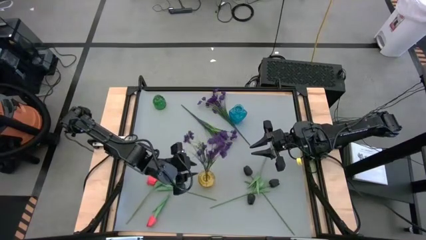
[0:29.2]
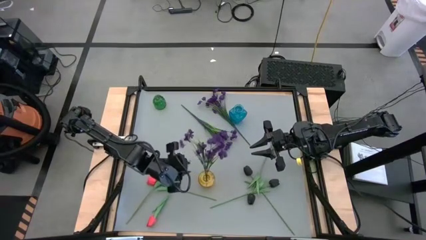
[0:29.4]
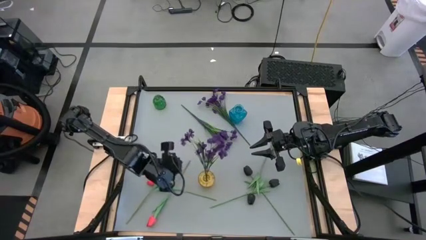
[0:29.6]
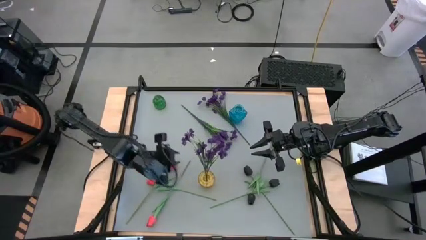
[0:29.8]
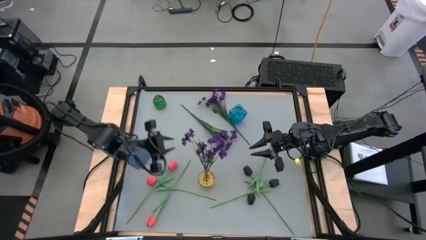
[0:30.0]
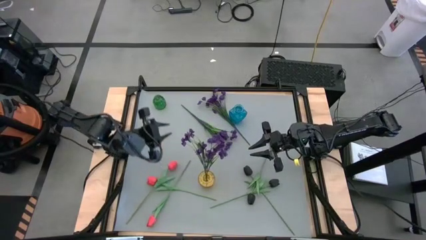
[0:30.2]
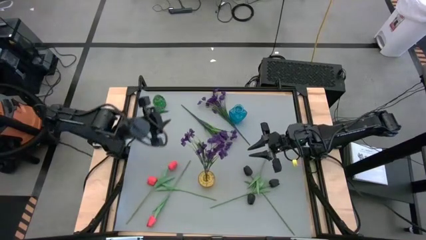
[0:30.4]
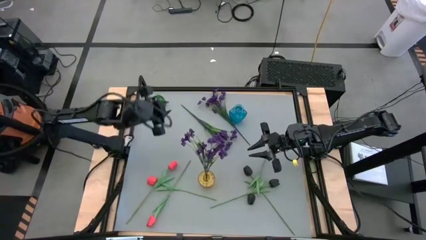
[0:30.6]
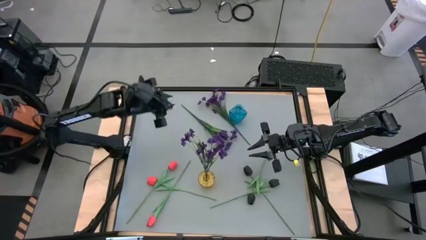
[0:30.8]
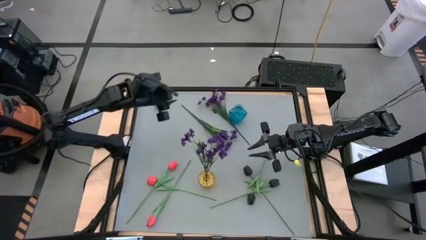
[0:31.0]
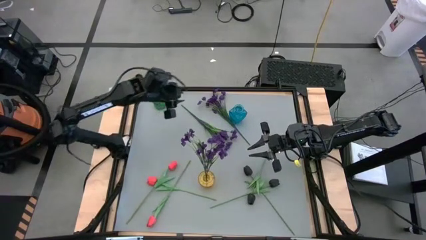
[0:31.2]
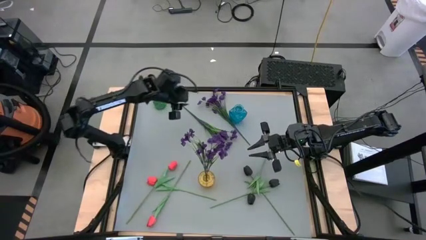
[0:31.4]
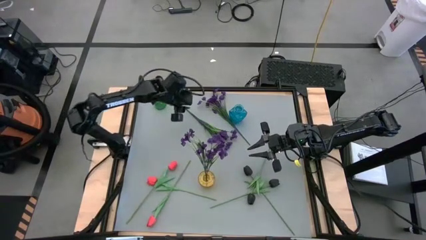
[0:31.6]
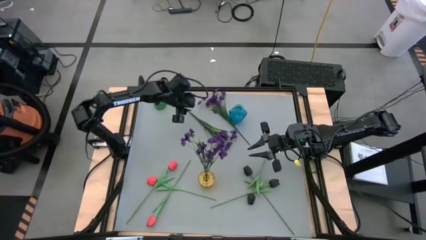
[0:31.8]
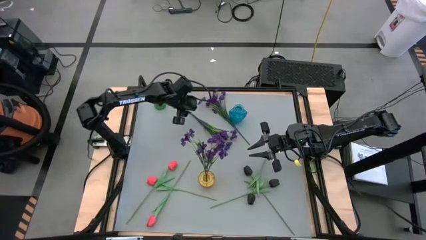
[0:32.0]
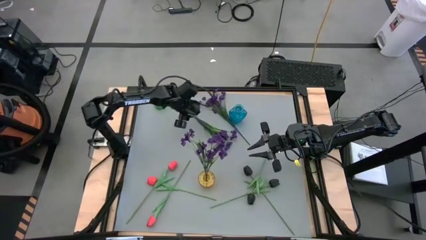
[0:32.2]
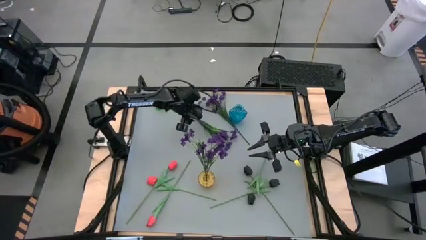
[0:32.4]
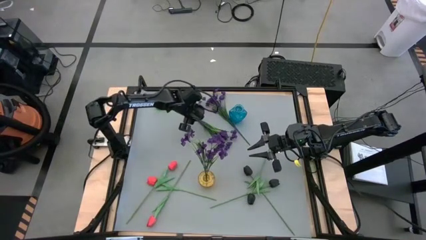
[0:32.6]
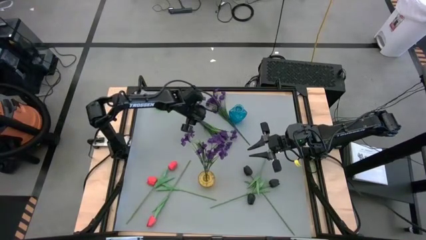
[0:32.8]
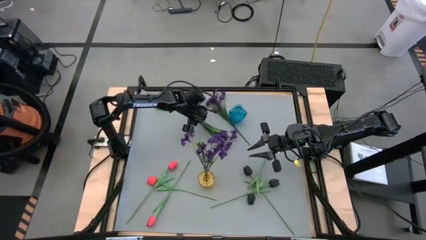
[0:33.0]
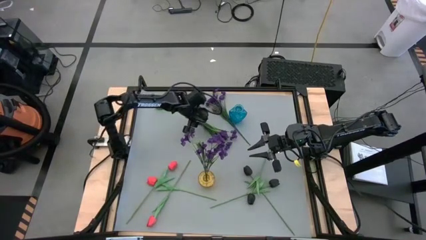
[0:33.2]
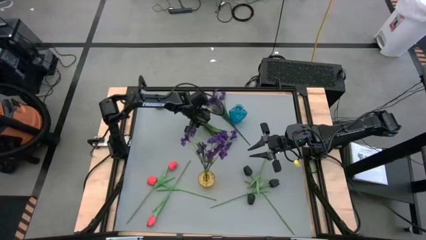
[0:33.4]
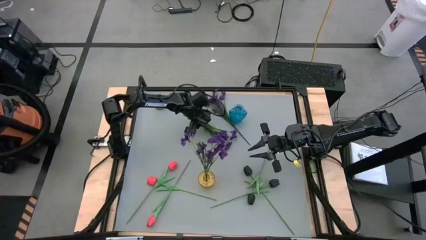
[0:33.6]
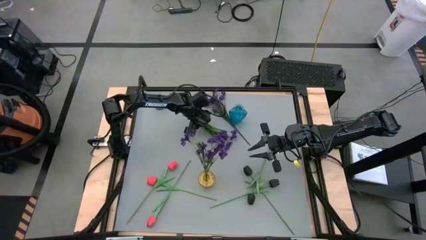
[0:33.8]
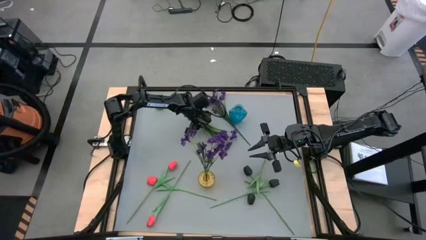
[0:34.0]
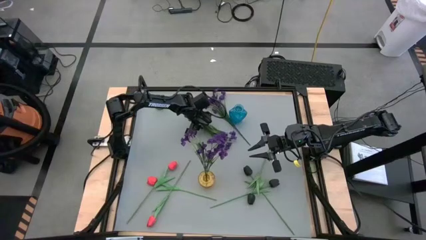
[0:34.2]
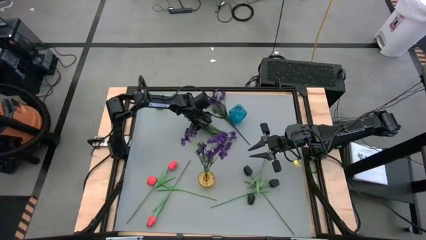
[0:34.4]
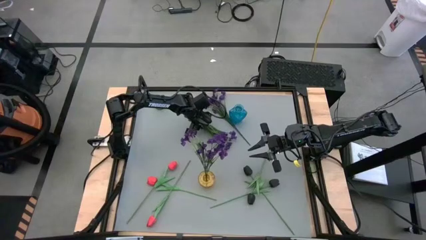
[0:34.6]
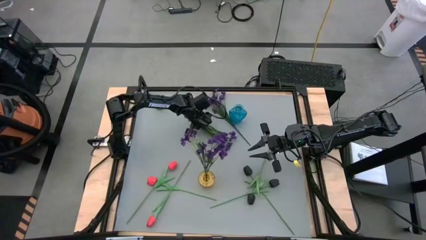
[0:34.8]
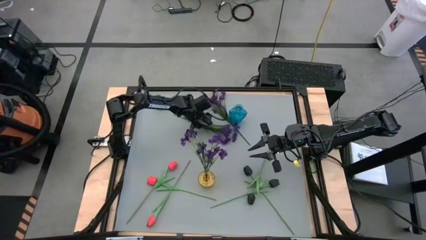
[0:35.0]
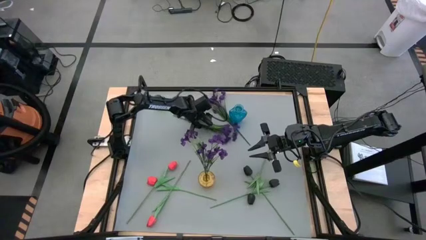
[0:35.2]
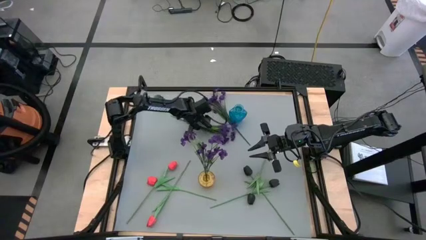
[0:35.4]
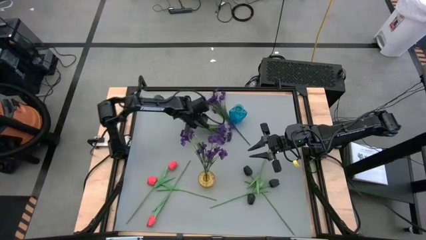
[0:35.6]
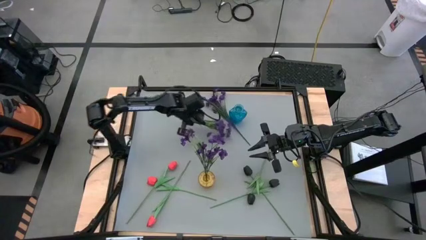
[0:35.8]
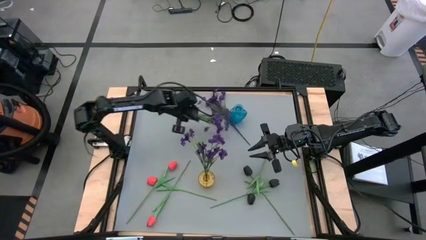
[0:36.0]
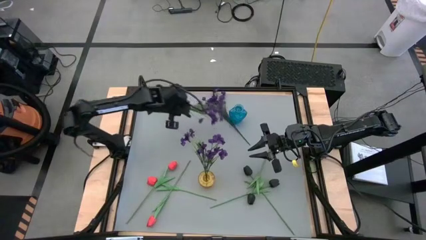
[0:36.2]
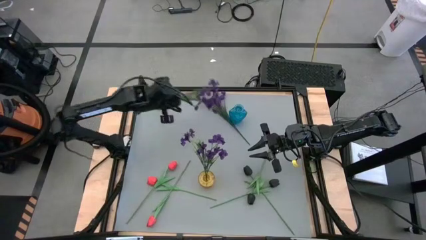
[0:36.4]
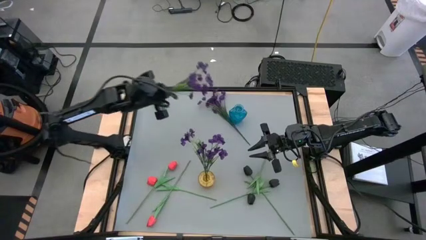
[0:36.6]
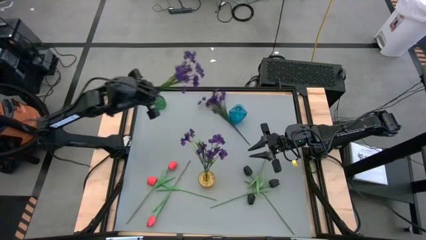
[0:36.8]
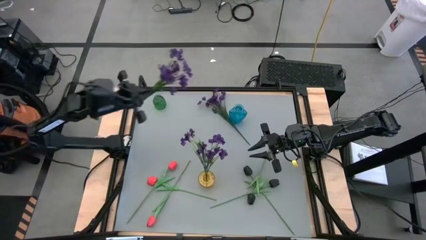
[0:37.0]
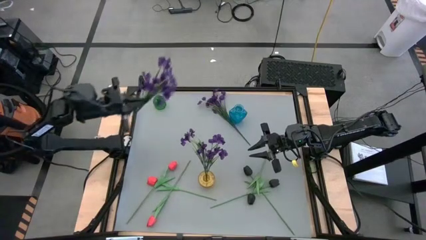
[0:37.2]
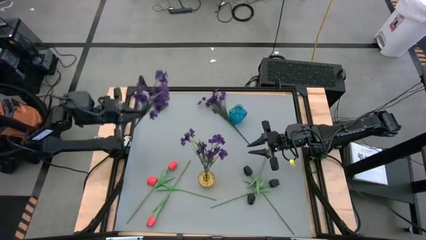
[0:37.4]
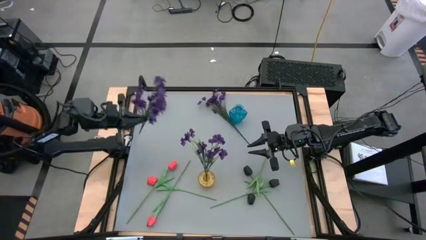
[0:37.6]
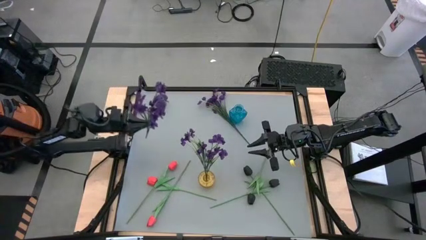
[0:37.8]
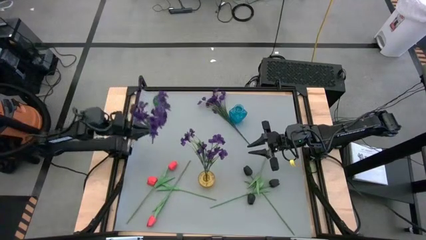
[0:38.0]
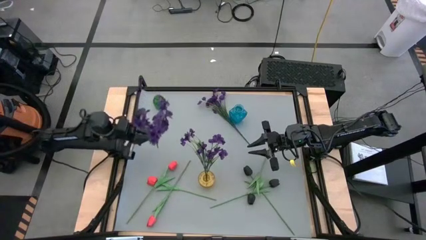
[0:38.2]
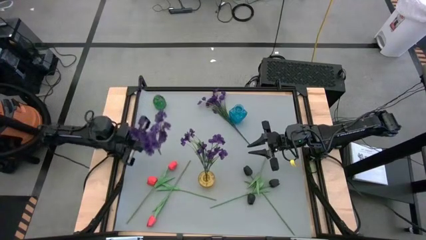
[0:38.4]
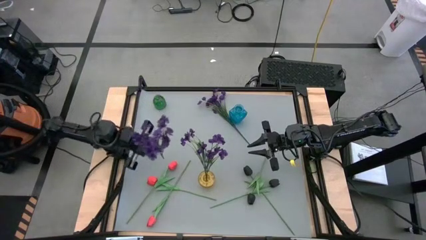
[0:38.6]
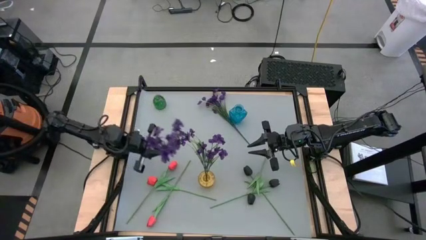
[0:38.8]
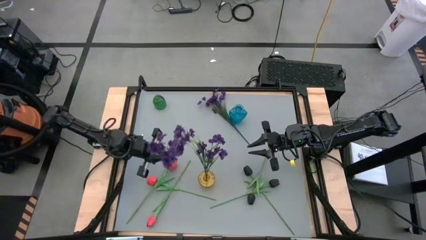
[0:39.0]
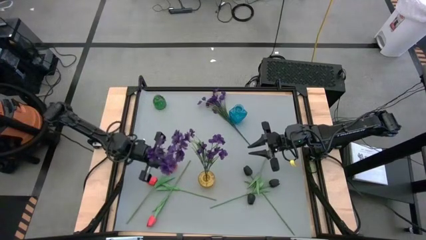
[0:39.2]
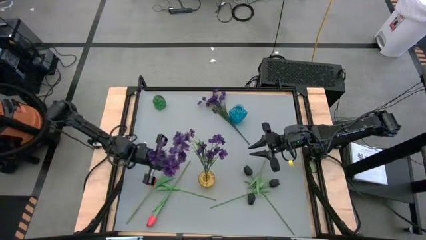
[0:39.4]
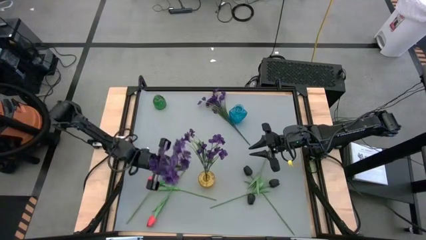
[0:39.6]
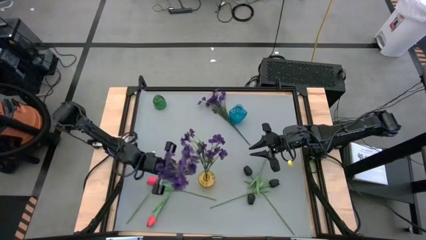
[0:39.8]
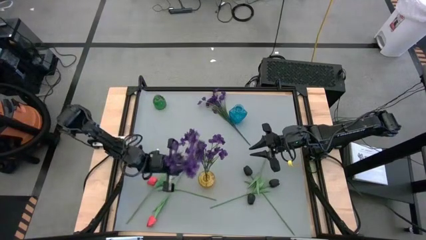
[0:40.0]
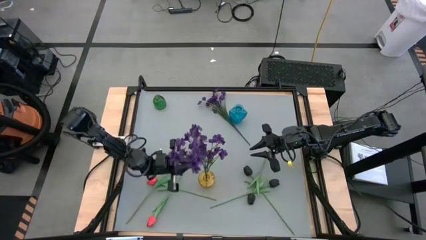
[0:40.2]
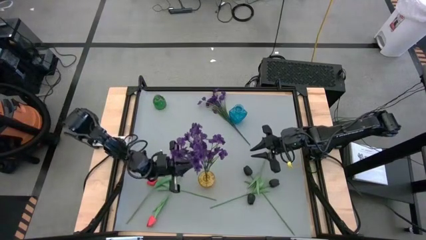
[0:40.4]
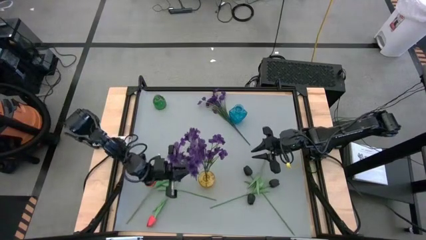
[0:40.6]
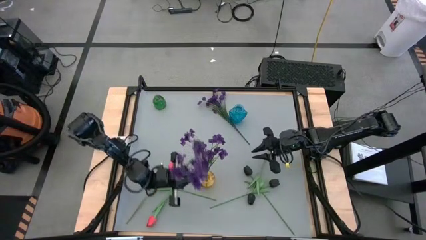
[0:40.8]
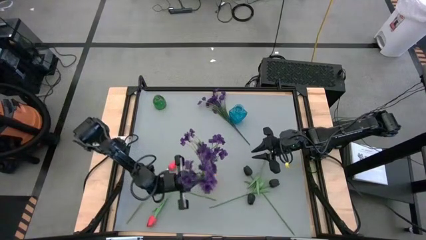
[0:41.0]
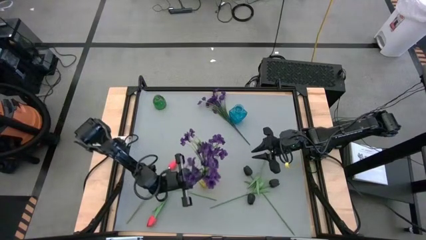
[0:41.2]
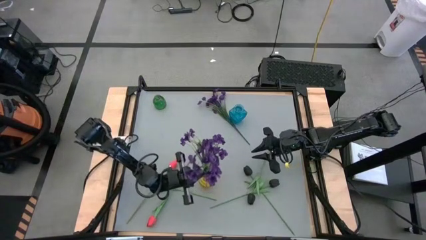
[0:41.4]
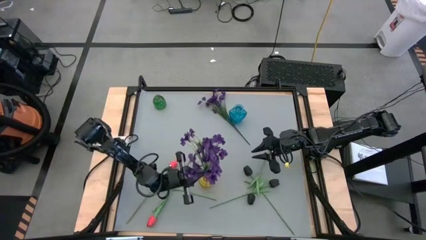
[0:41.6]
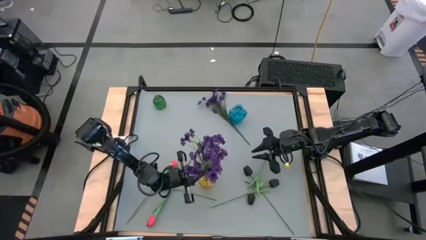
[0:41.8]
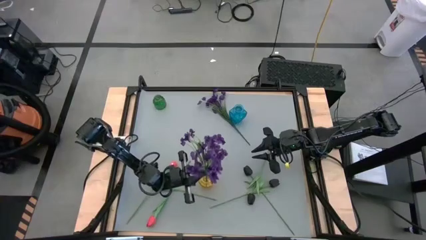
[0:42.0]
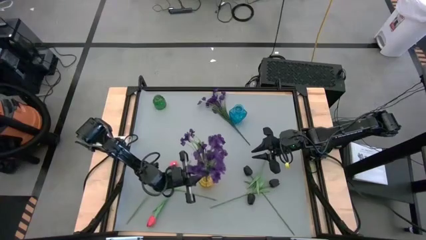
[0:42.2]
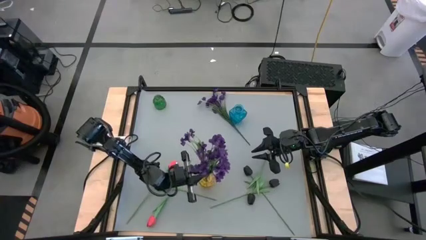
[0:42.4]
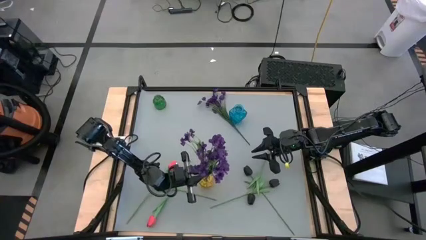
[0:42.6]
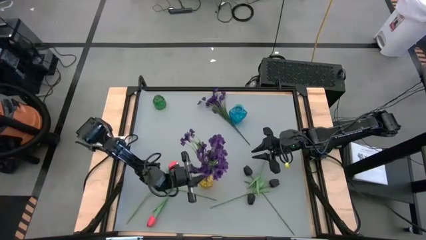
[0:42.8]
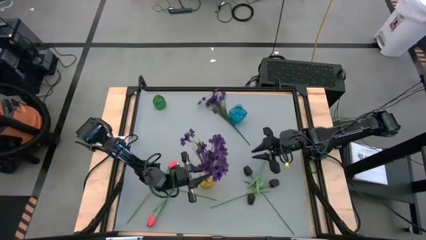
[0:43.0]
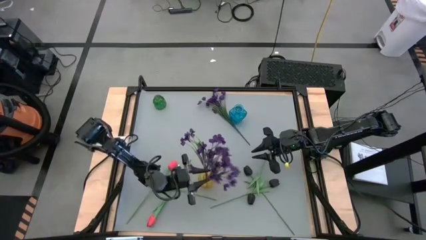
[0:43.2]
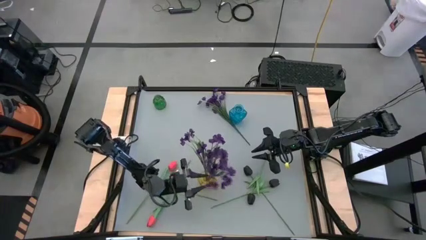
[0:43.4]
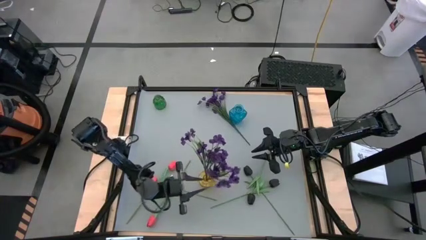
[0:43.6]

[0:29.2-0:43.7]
Task: Sort flowers into vase by color
Put the bottom violet flower into the yellow vase
